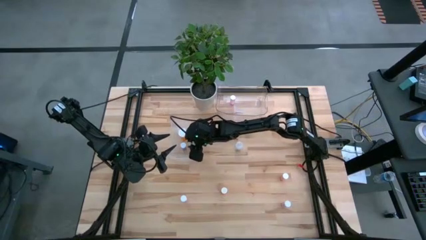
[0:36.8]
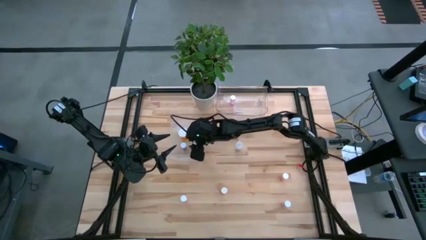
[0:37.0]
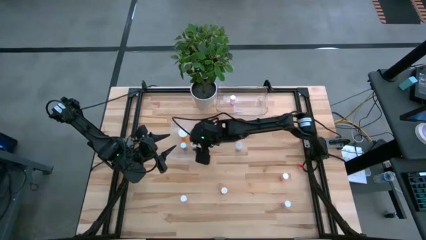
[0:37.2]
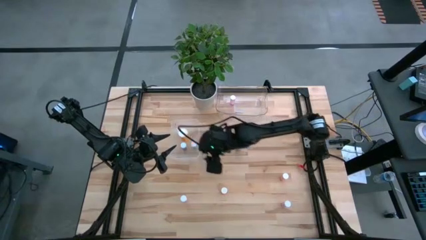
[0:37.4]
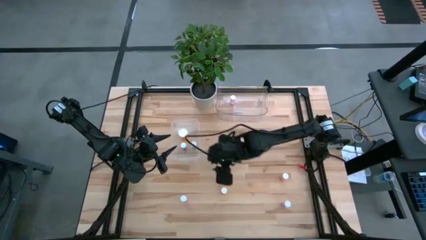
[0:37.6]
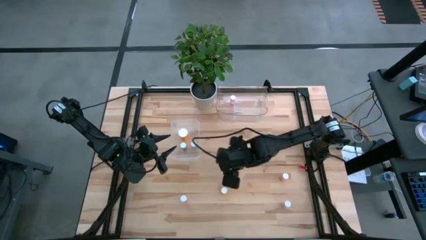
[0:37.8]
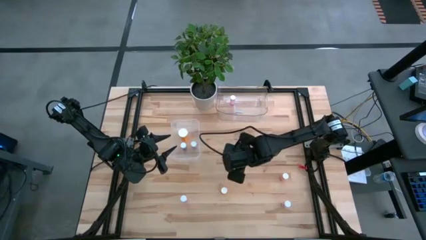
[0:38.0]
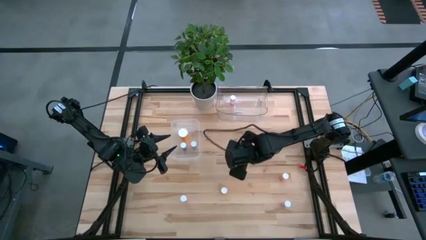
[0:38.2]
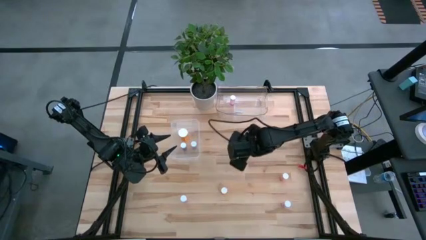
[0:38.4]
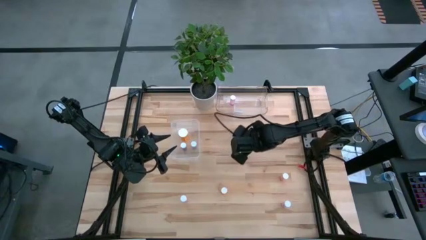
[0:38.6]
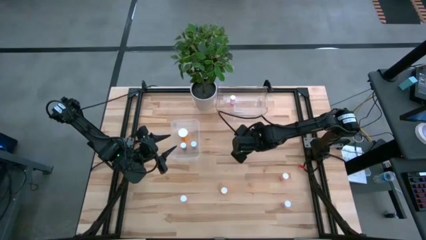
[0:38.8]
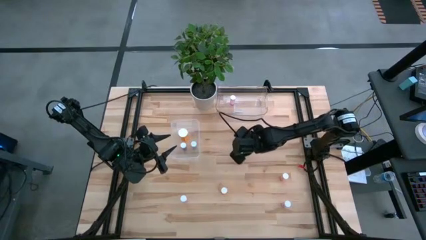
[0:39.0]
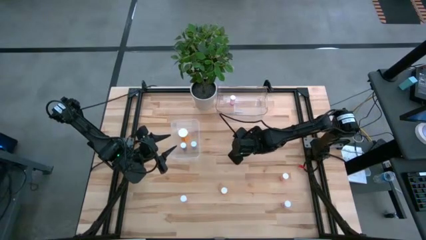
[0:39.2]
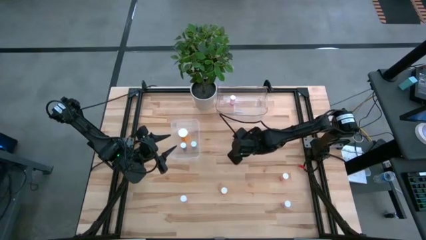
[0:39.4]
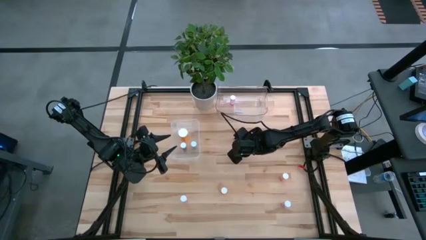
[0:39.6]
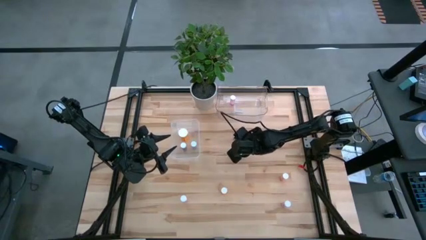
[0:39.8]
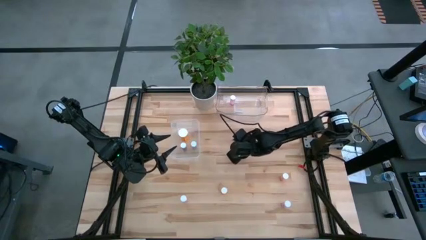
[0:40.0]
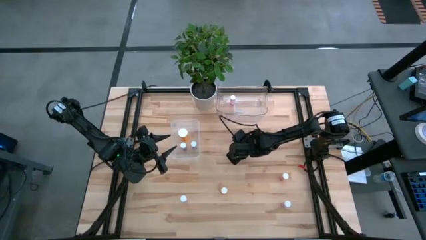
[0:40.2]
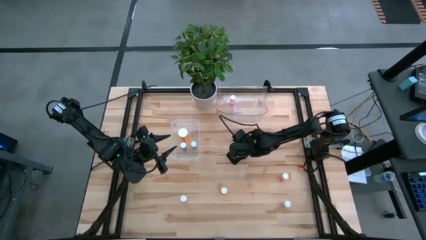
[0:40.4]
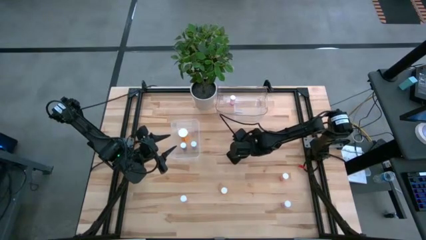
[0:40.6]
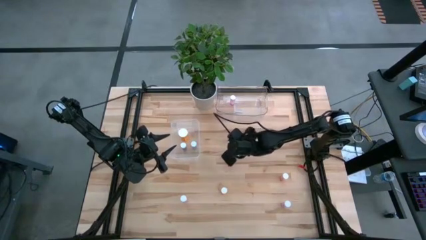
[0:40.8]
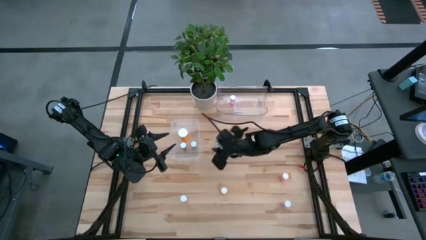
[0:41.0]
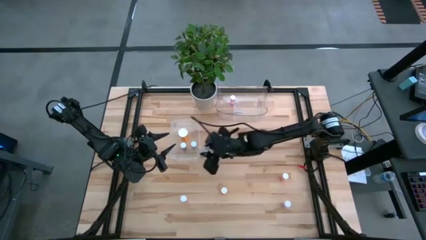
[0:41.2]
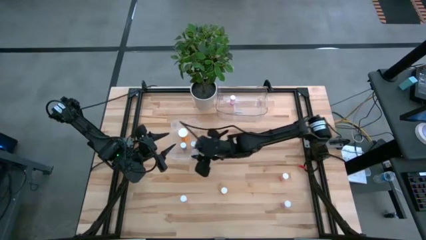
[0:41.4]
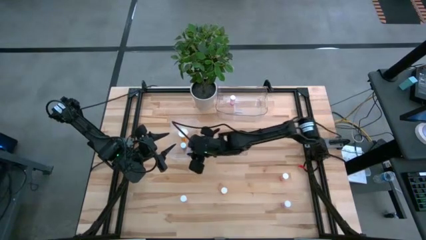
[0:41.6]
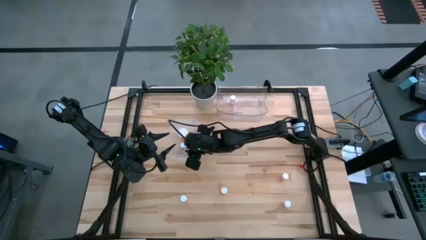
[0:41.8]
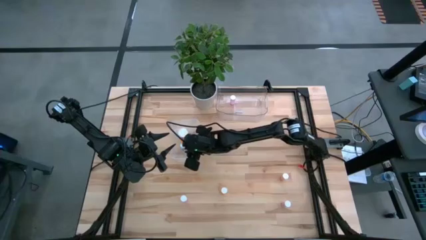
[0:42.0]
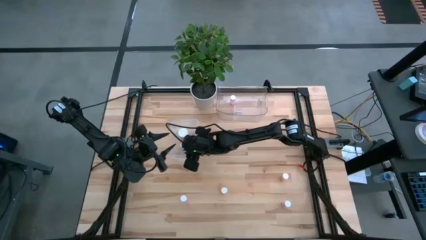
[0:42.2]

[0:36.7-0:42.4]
Task: Pick and place medicine bottles into bin by pill shape (circle, oval)
Put the transparent pill bottle into the bottom transparent bin

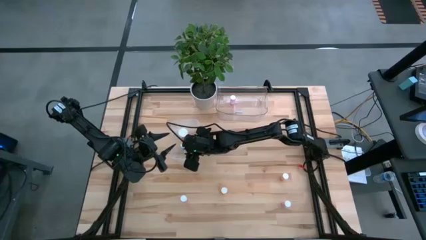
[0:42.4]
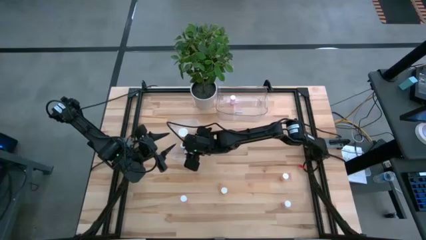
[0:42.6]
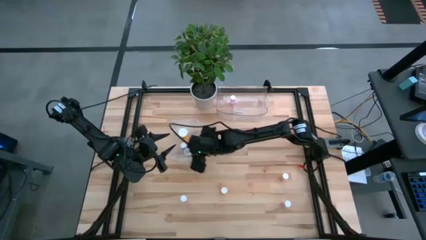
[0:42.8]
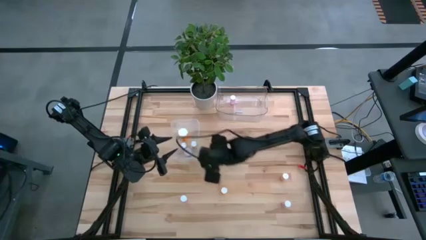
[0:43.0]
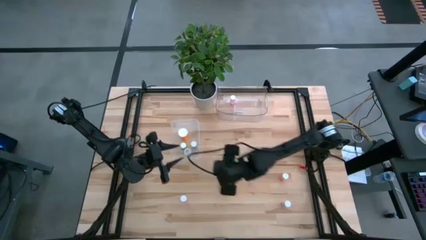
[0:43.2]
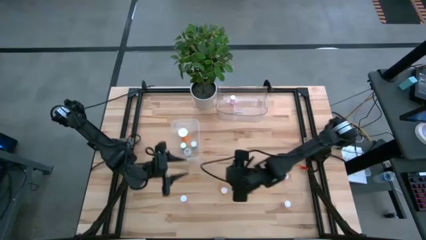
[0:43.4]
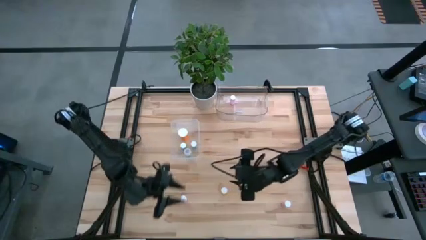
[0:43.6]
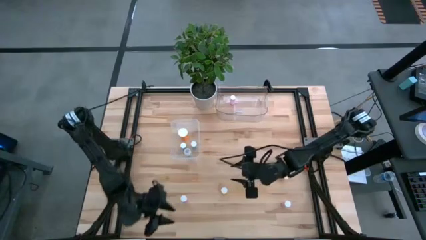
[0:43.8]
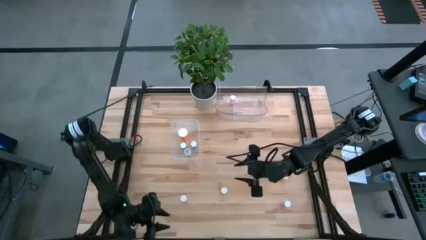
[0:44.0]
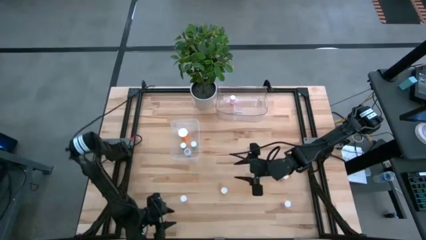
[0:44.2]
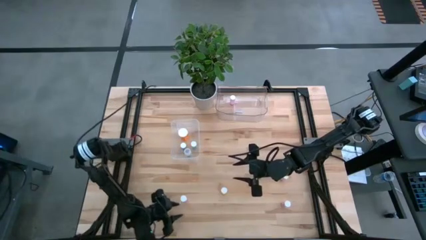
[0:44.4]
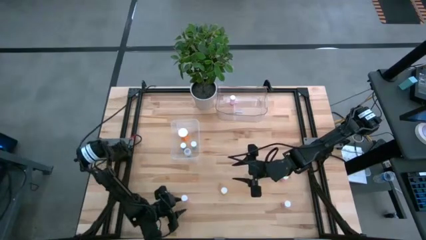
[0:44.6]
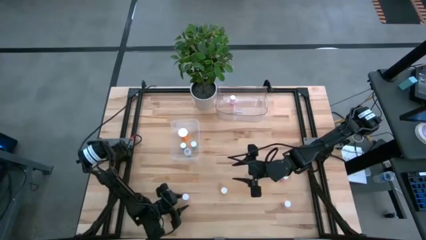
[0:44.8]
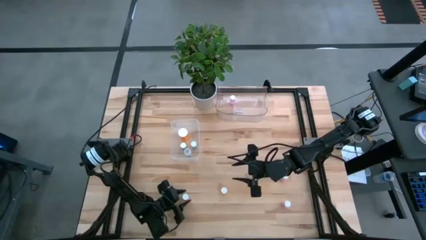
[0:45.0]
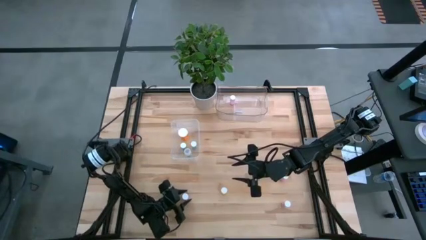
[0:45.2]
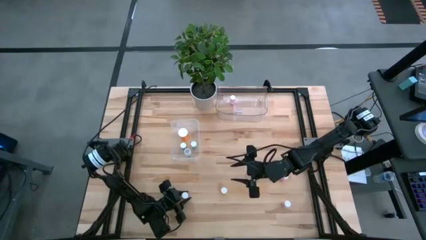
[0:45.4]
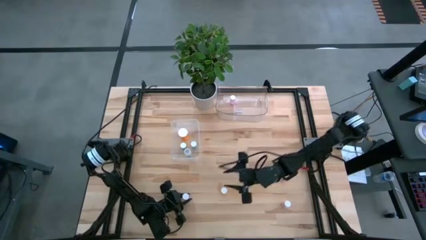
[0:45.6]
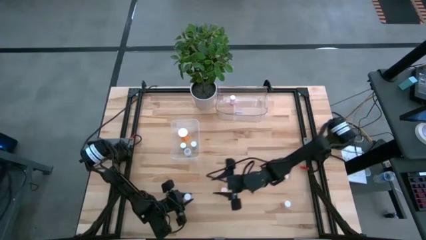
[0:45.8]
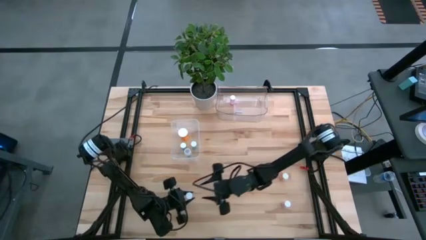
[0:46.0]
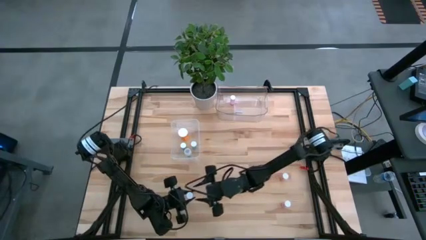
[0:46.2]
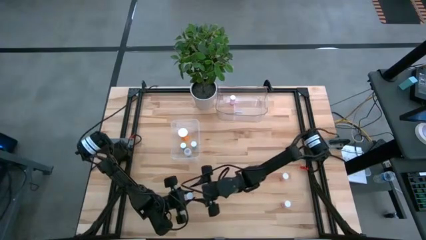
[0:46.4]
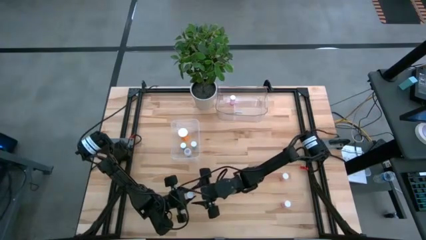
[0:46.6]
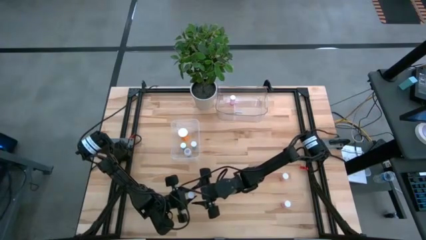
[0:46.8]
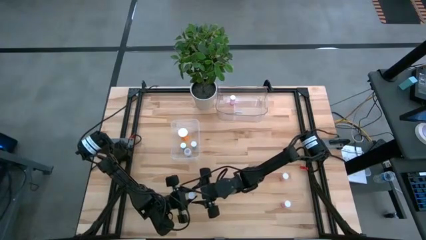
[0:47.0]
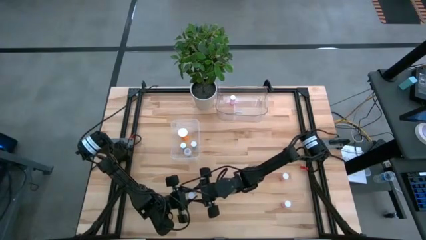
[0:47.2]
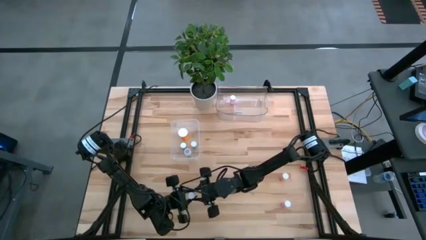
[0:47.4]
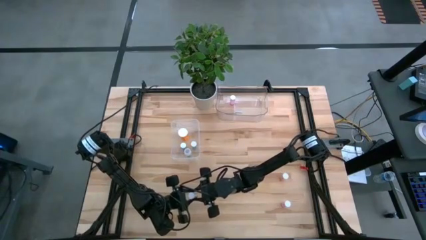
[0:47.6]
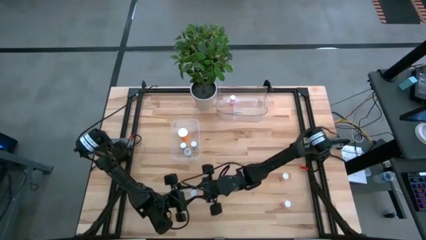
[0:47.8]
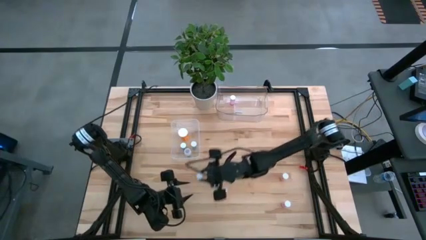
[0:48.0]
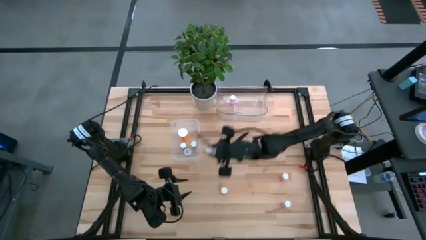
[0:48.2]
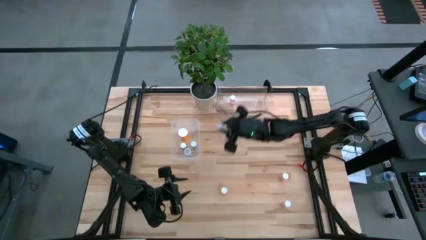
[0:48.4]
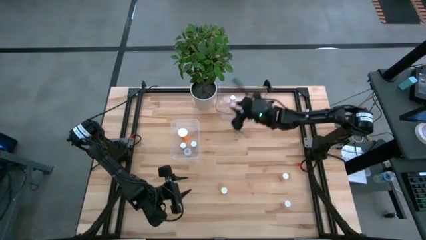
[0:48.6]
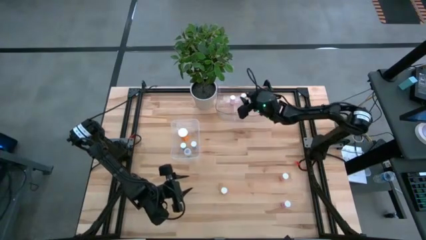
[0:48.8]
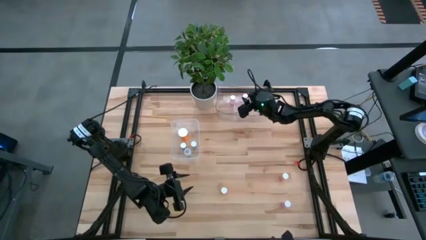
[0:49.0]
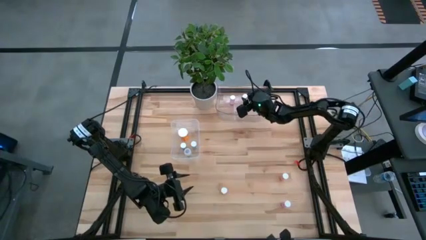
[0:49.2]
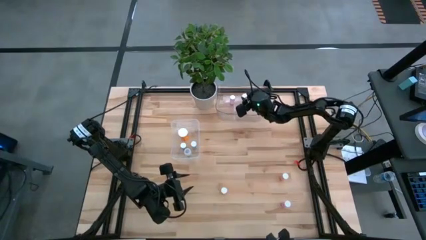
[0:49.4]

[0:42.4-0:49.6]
Put the left pink pill bottle into the top transparent bin

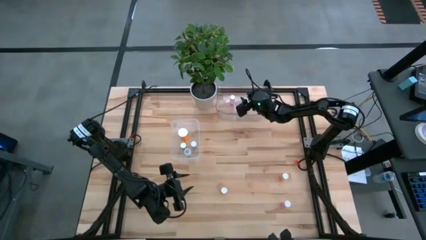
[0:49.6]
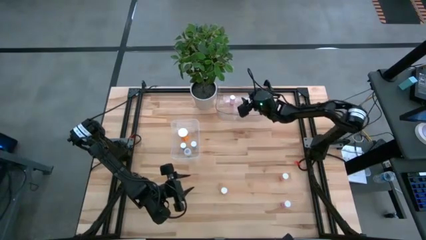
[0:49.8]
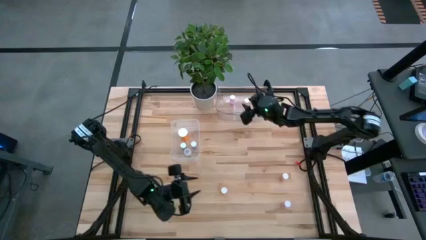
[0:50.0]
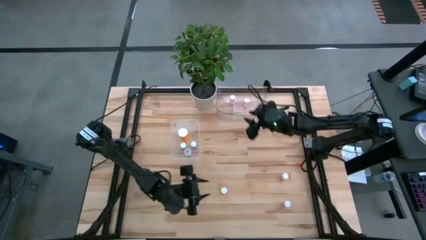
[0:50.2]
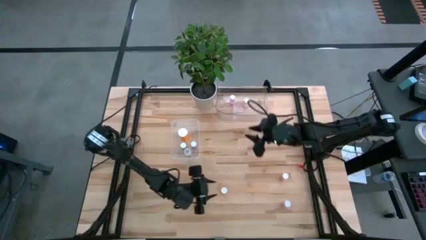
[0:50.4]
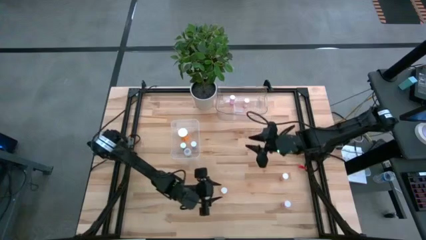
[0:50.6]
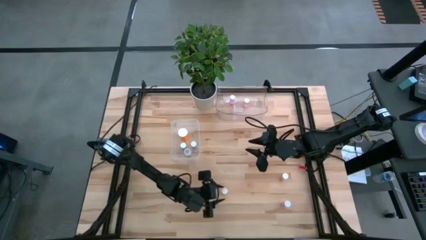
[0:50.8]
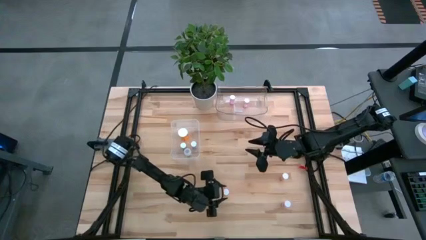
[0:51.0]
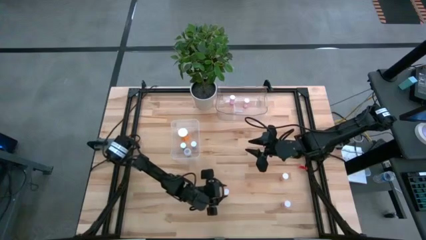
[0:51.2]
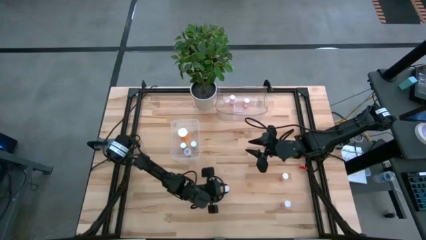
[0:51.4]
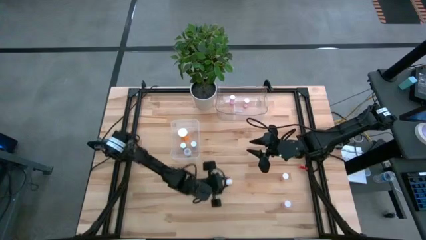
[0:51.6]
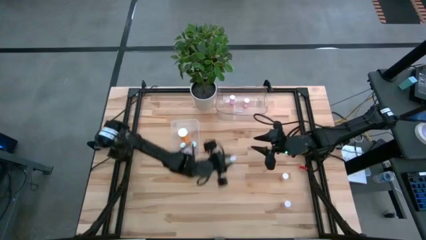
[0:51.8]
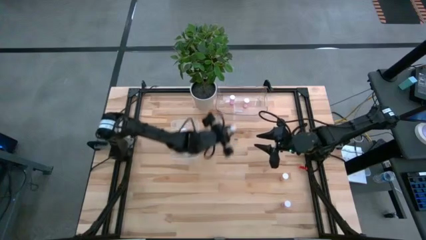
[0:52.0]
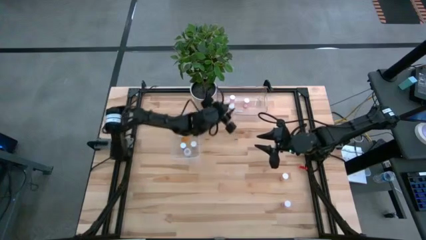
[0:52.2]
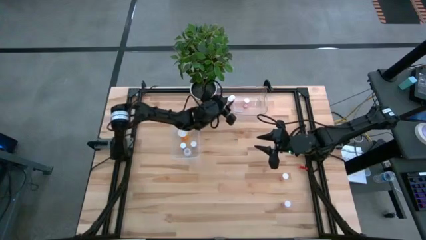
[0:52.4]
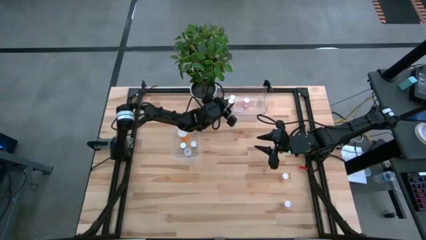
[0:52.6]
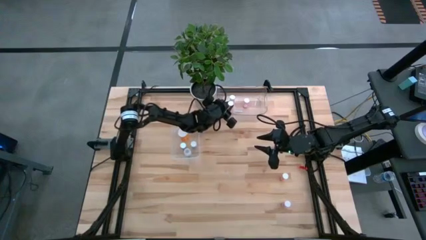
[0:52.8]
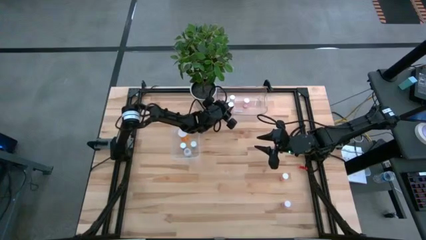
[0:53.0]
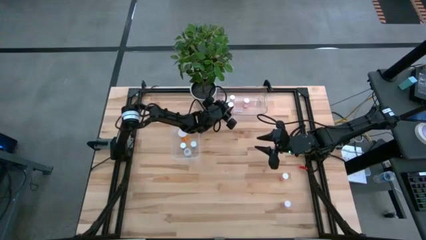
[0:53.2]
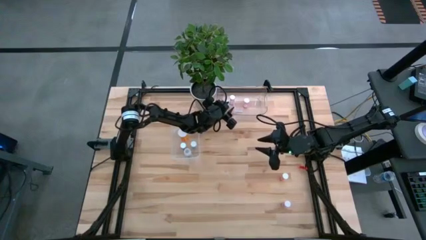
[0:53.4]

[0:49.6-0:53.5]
Put the small orange pill bottle into the top transparent bin

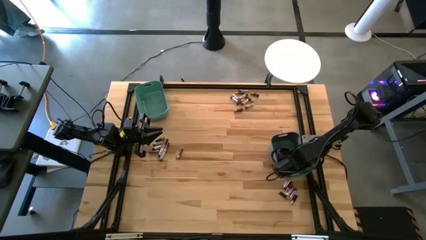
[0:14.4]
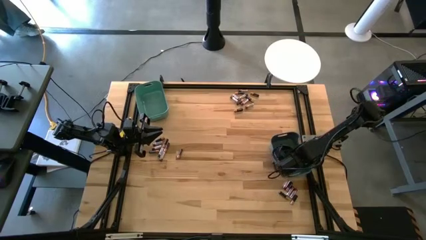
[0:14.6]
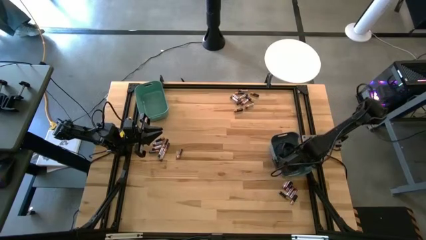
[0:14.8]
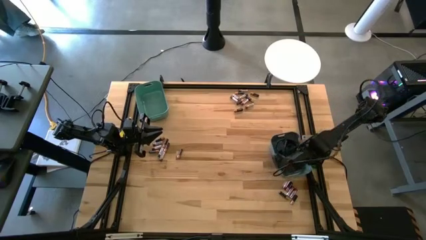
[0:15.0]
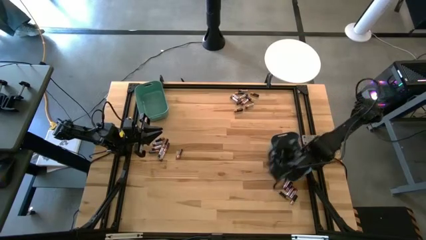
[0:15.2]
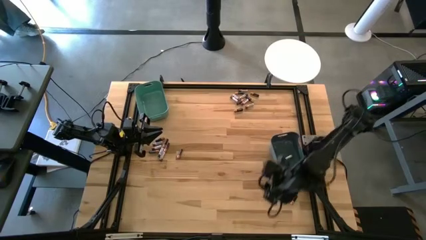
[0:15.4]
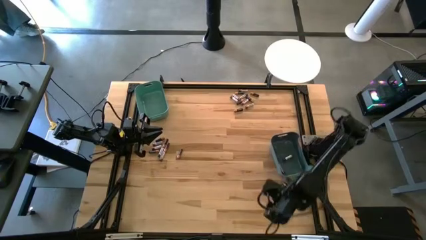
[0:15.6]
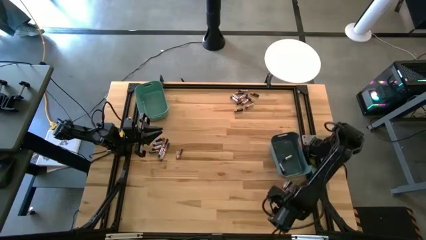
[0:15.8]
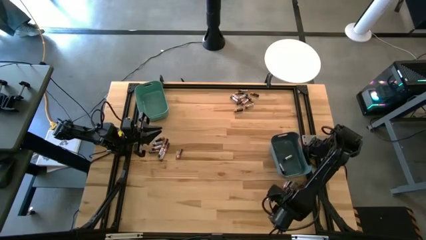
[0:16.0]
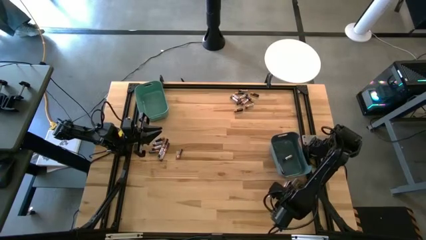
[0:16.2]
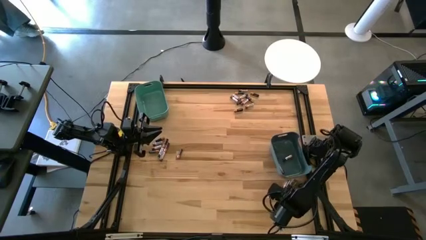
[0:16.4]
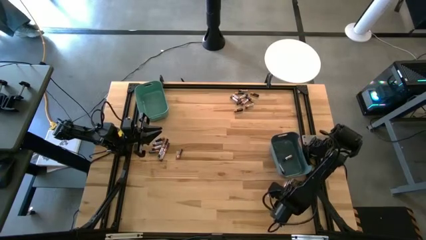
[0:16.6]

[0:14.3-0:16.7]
Task: Sort batteries
Put the black battery into the green bin
